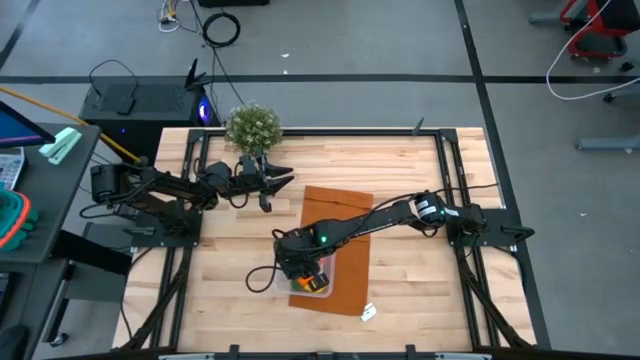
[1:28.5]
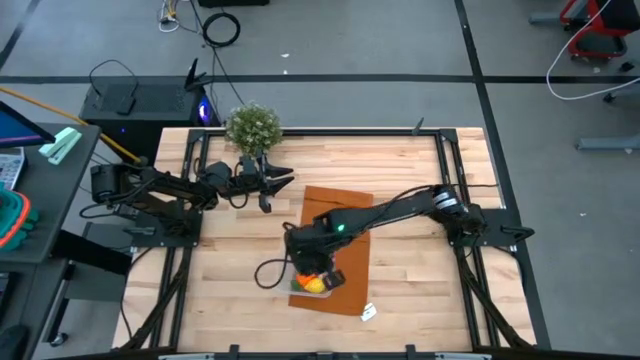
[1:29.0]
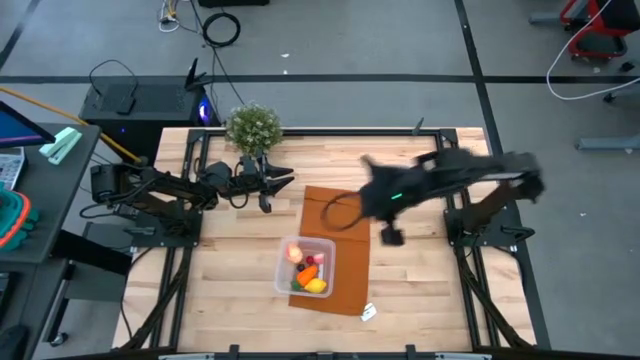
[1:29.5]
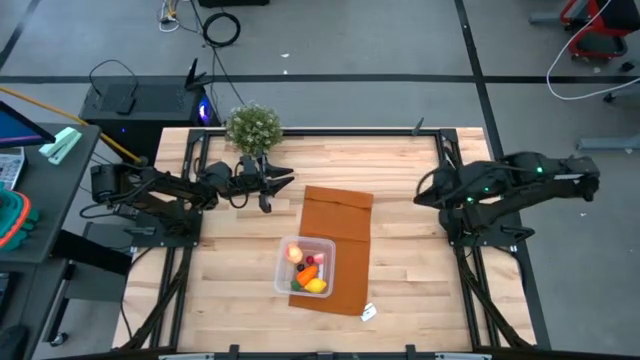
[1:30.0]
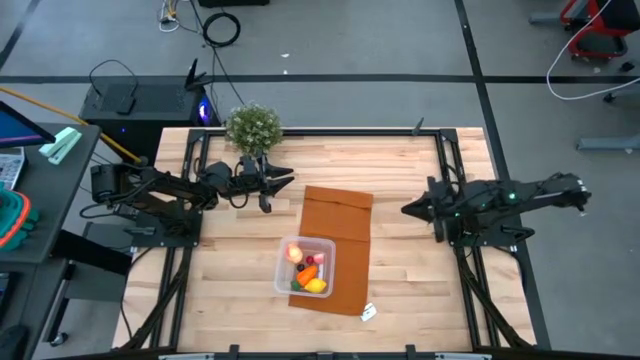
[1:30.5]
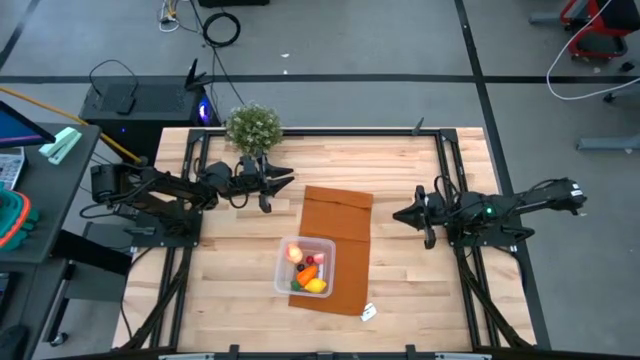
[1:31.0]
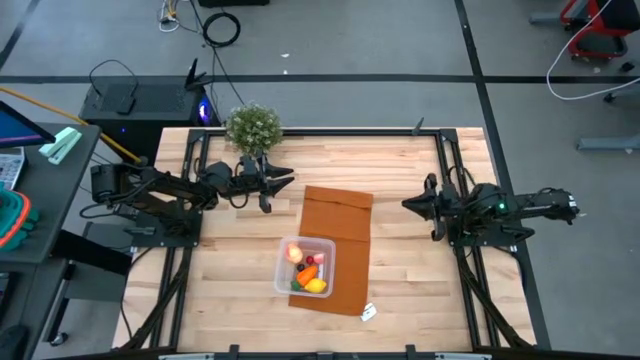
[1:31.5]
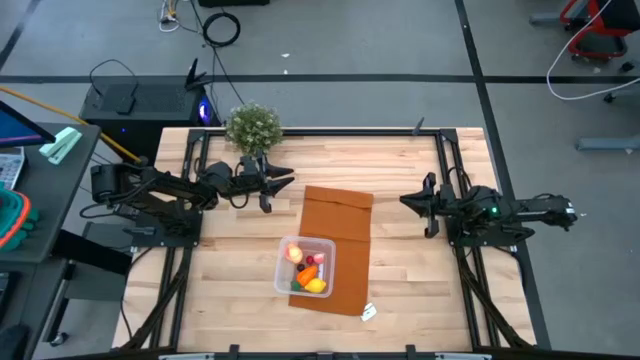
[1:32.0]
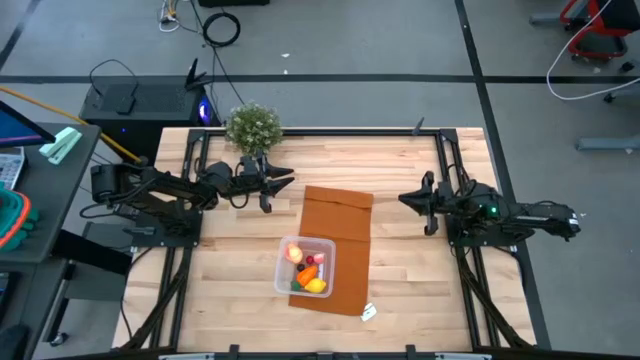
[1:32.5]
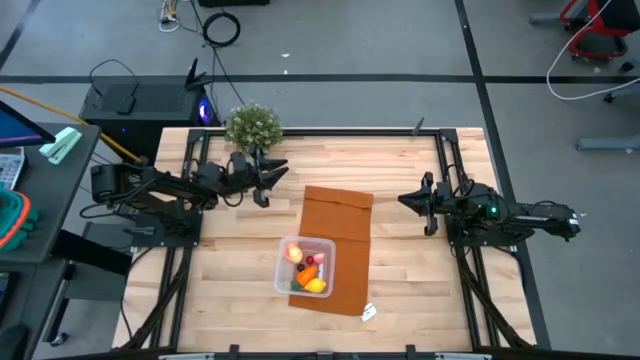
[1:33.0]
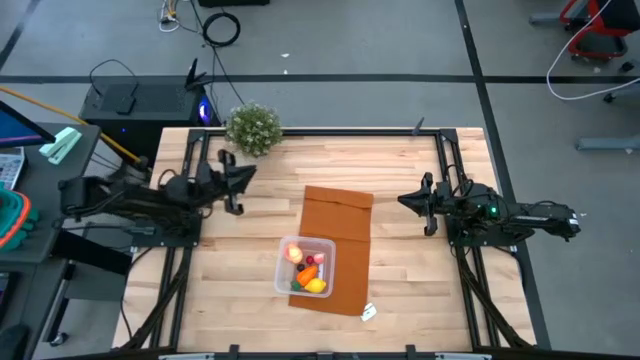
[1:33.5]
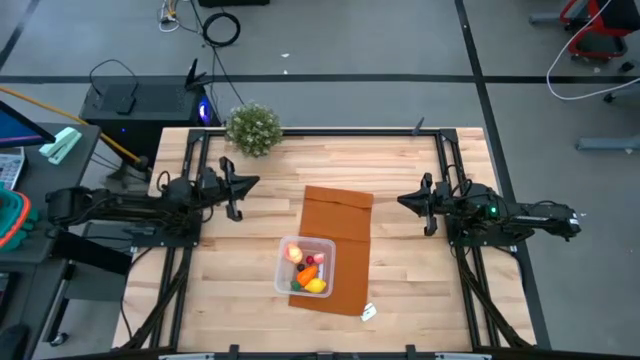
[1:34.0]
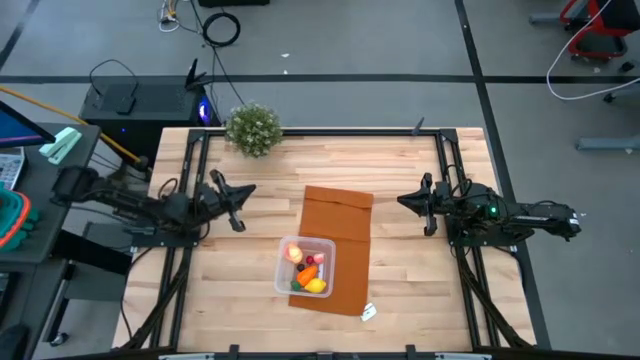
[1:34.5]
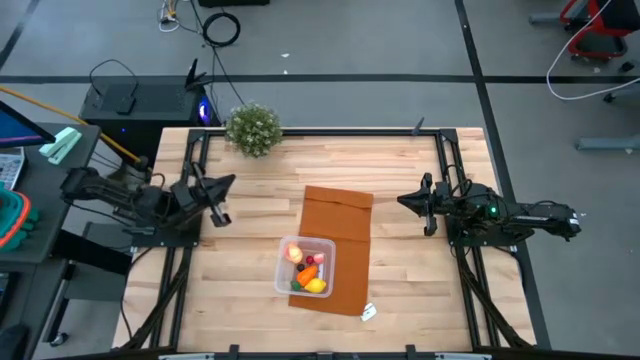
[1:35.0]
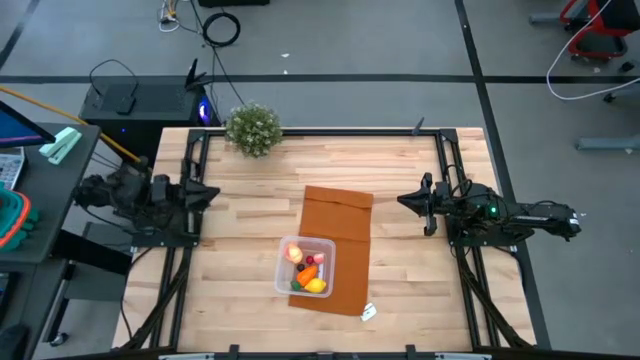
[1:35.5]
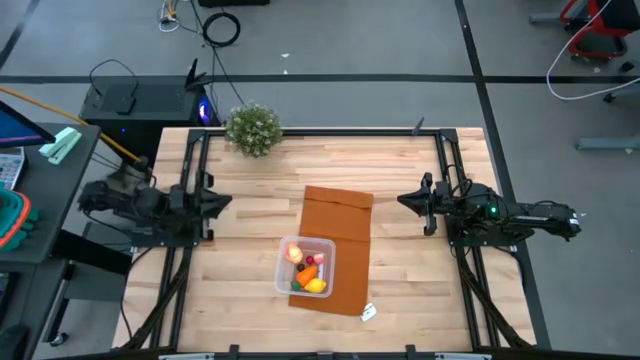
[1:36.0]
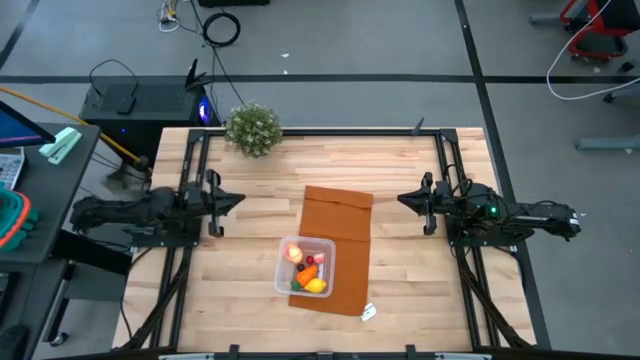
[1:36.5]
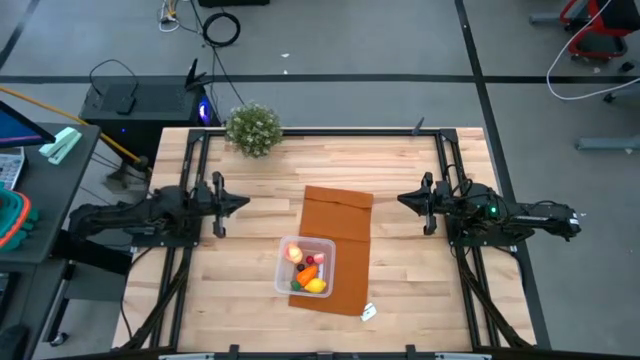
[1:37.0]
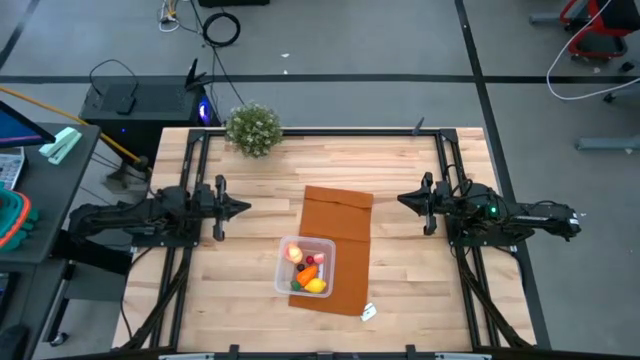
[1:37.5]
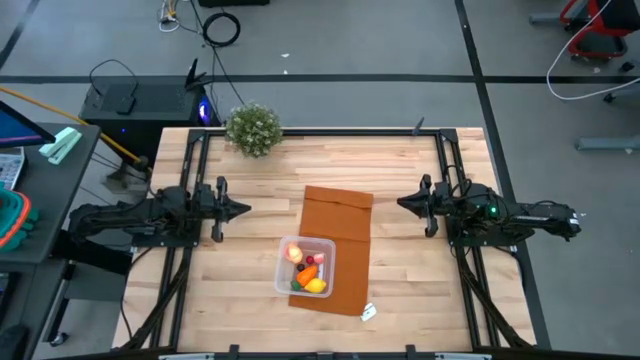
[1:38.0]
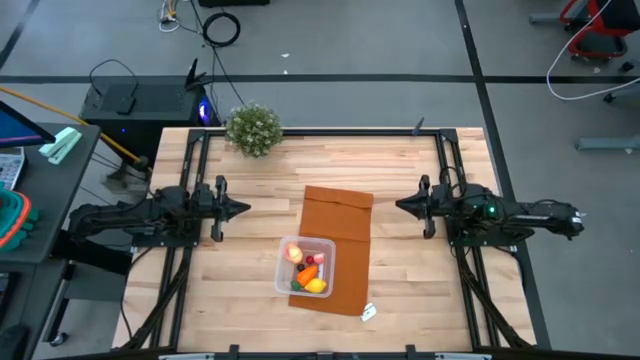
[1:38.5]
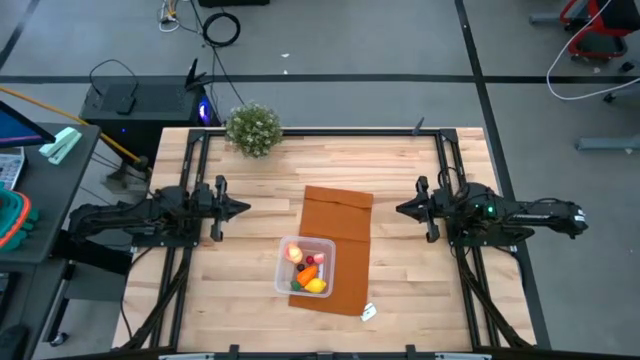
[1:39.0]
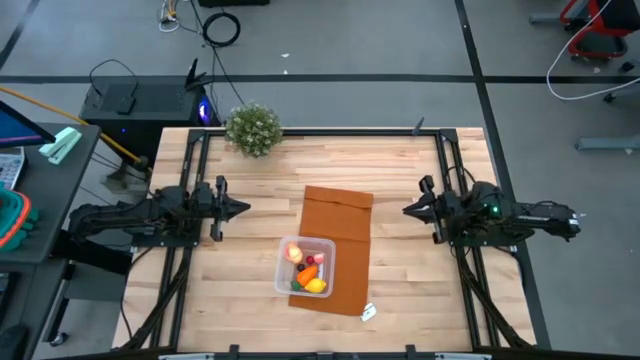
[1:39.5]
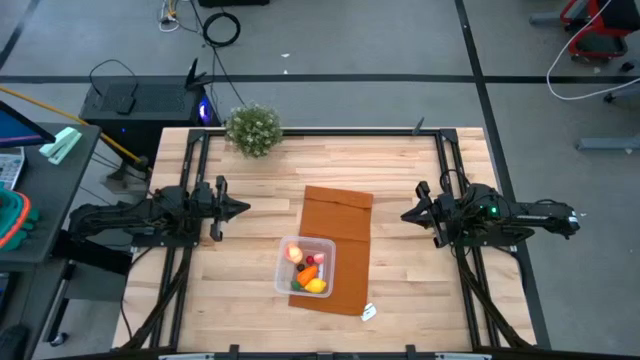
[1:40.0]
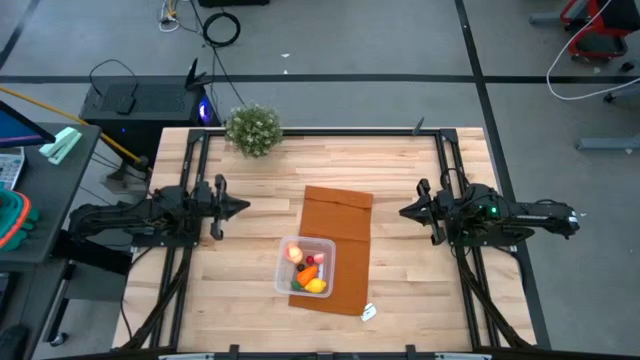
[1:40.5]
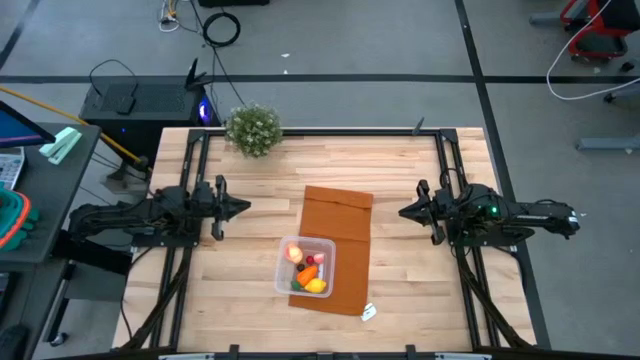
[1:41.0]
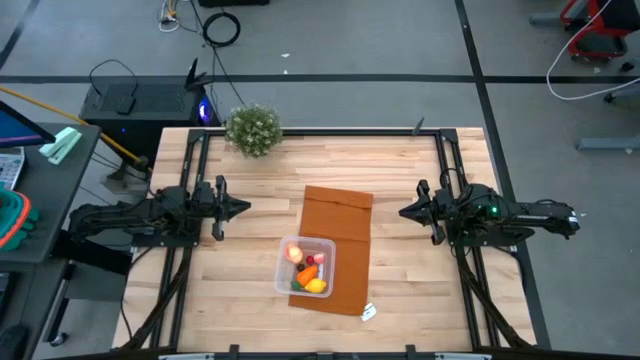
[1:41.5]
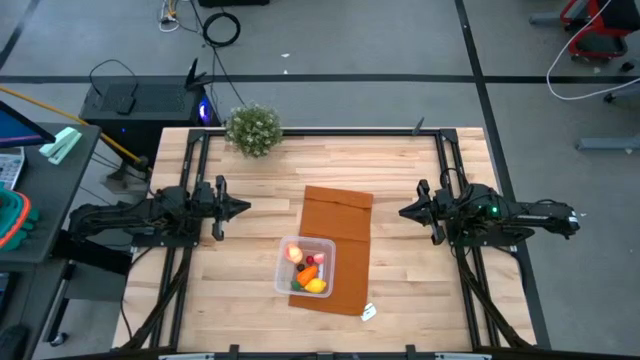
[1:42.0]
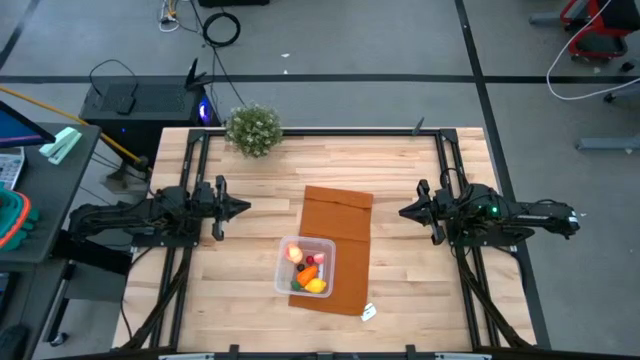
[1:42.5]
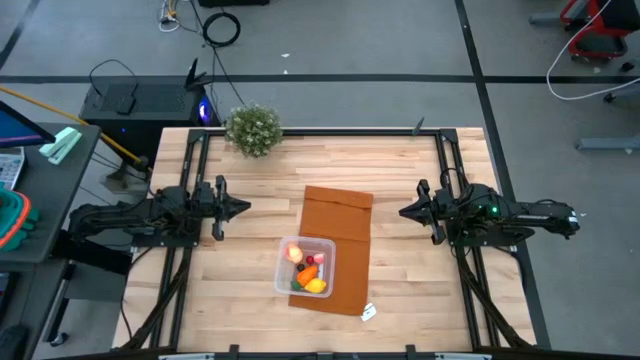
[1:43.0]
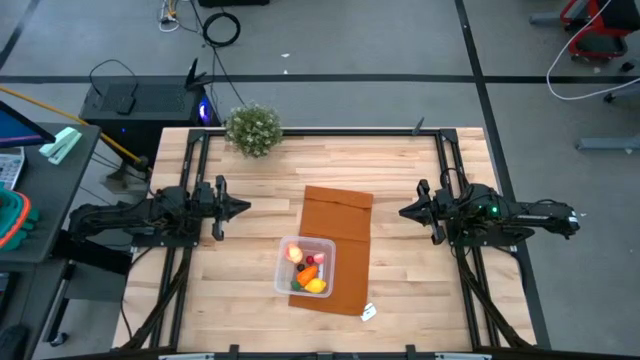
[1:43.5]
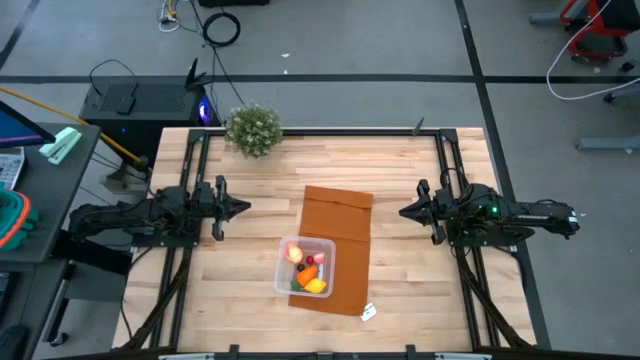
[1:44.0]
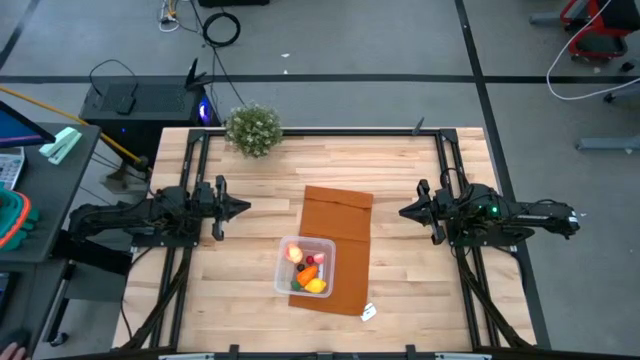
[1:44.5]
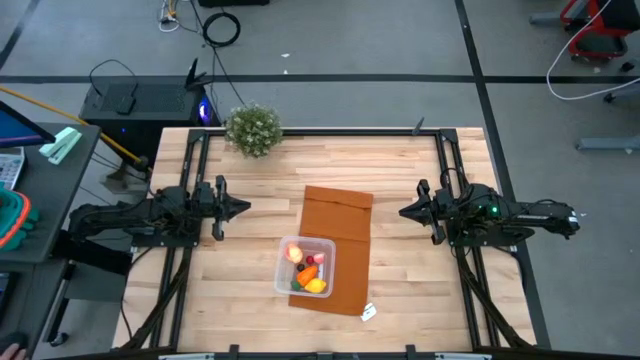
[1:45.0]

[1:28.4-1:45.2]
Task: Pick and placing Produce into tupperware
Return to Home Position

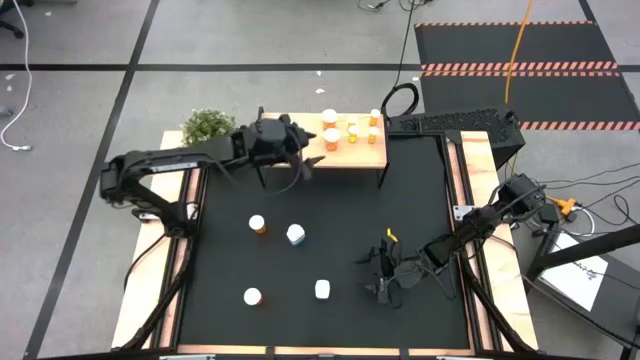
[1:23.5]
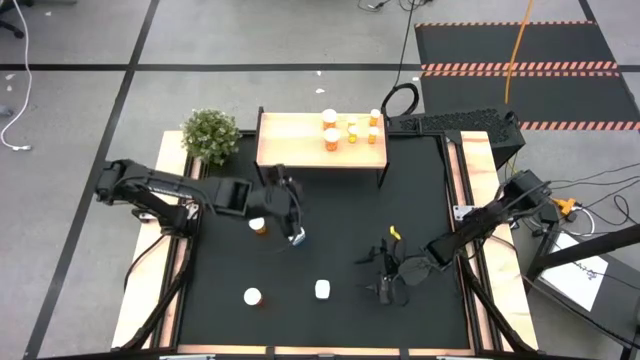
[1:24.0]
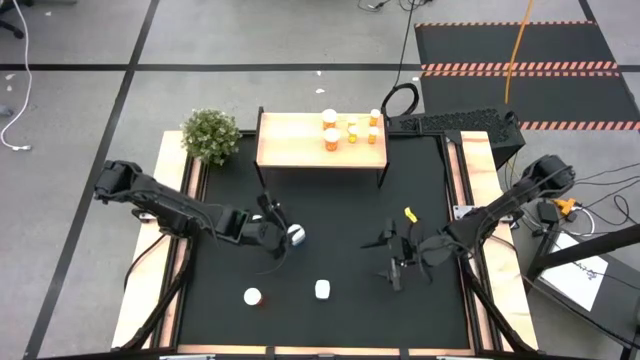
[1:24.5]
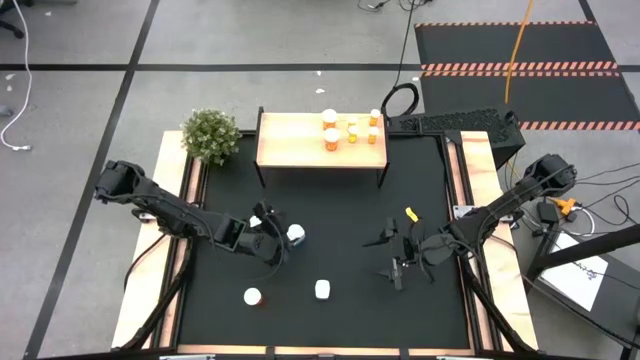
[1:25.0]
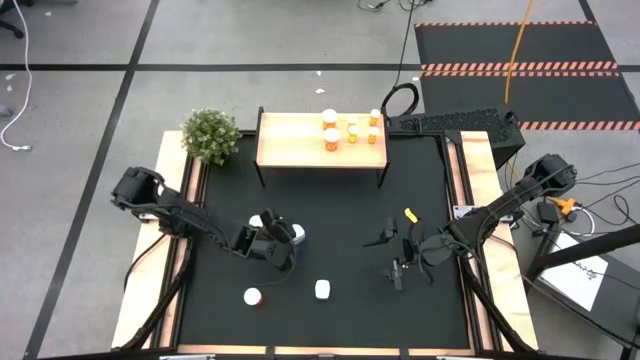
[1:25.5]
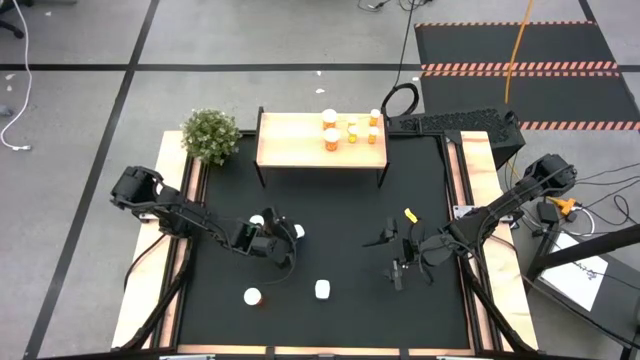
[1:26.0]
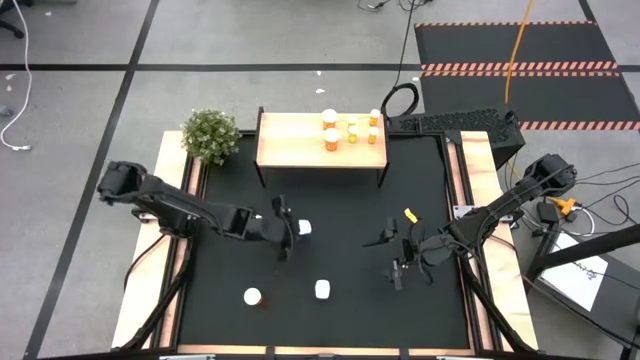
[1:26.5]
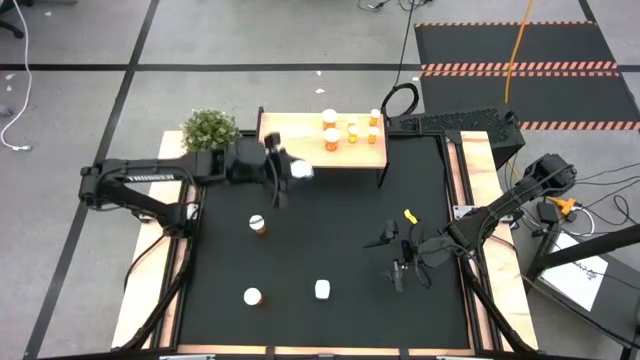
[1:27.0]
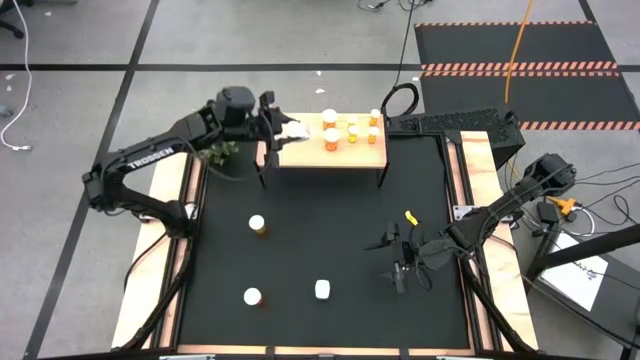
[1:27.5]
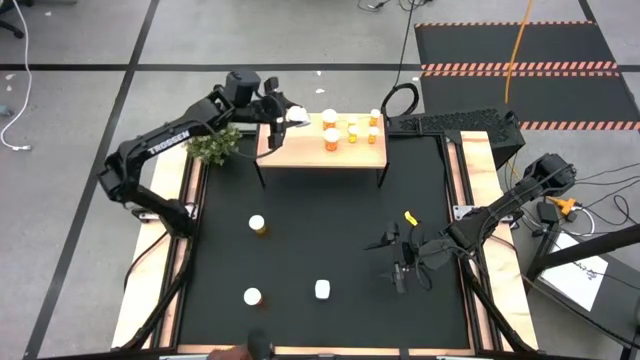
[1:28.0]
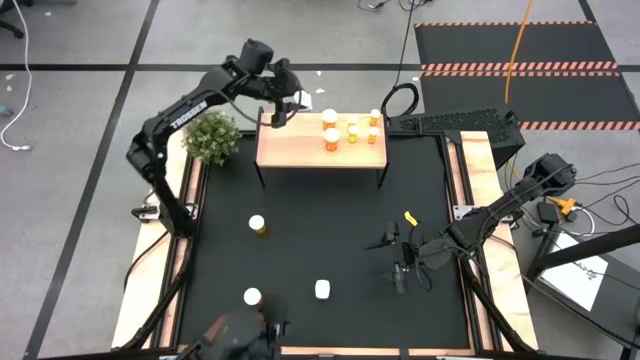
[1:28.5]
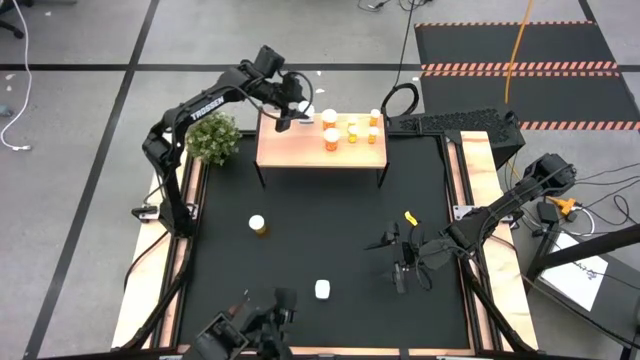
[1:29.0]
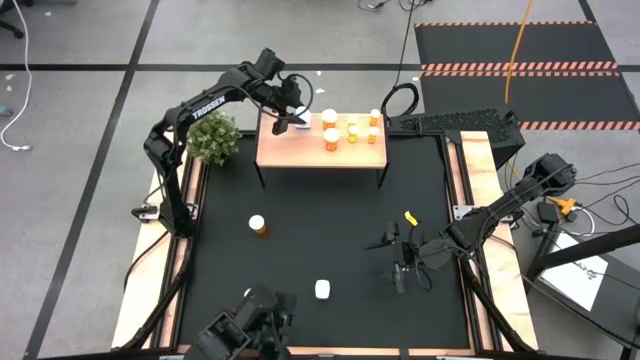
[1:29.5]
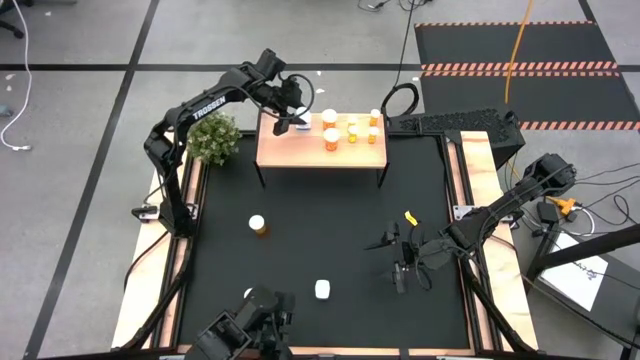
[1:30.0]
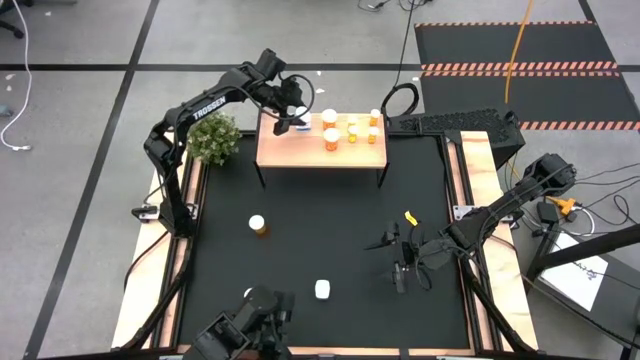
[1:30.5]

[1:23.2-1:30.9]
Task: Pick and place medicine bottles onto shelf by color
Put the white pill bottle on the shelf
